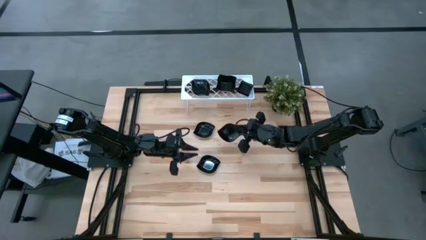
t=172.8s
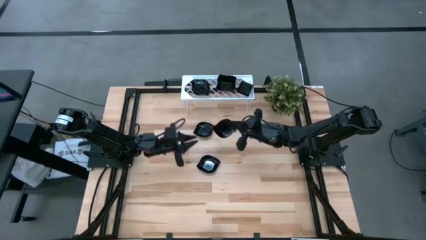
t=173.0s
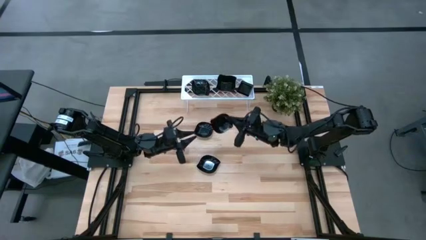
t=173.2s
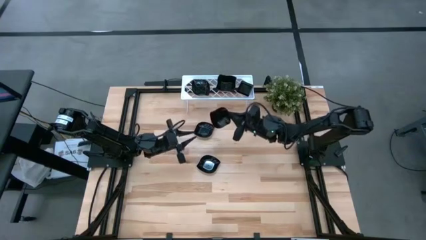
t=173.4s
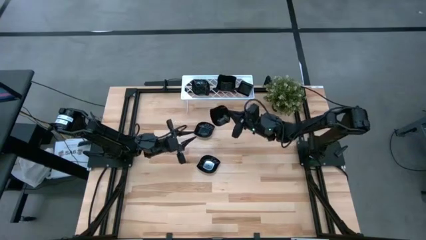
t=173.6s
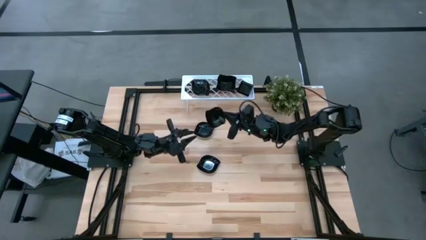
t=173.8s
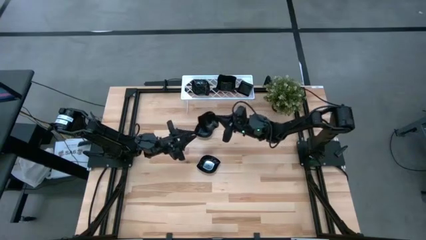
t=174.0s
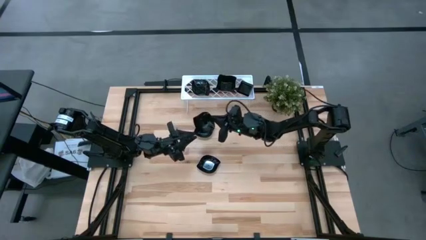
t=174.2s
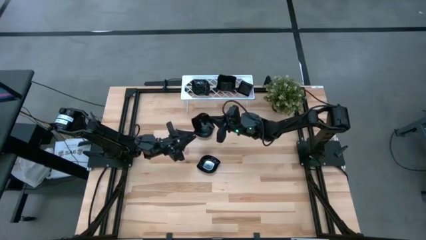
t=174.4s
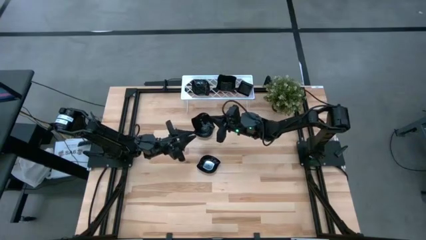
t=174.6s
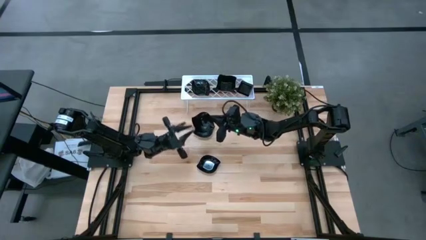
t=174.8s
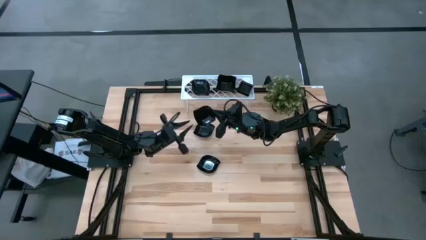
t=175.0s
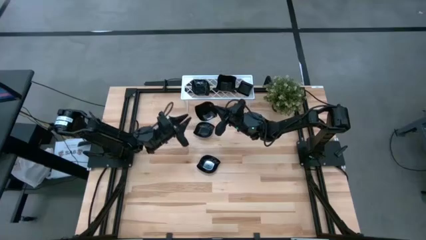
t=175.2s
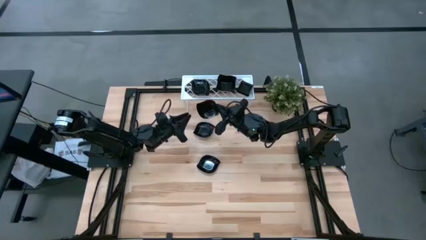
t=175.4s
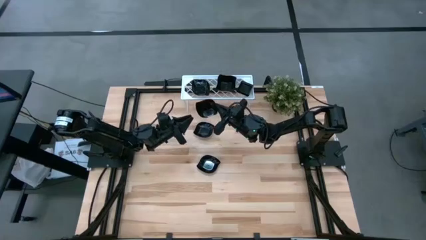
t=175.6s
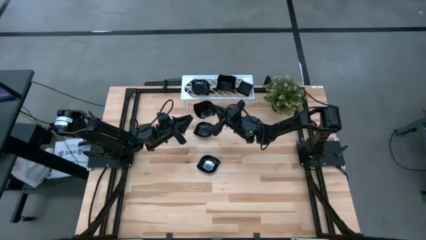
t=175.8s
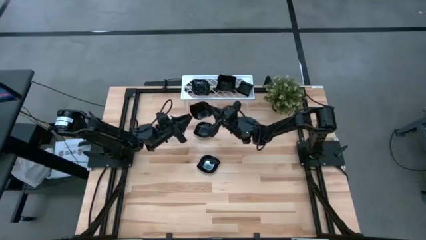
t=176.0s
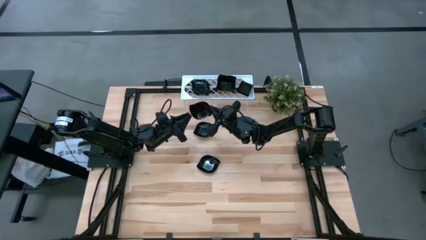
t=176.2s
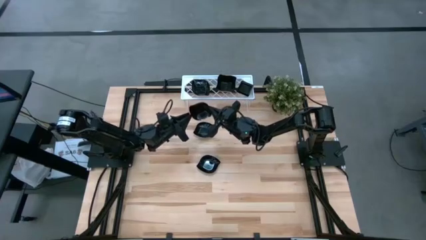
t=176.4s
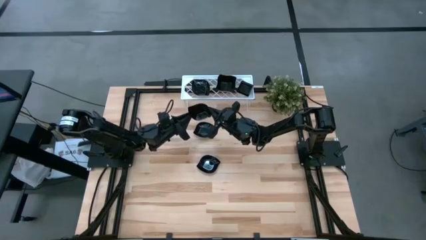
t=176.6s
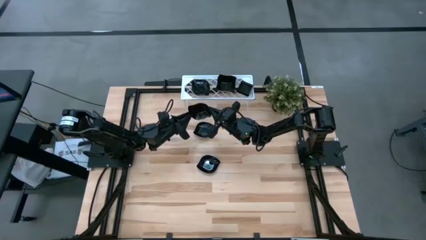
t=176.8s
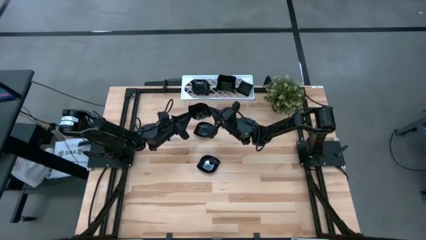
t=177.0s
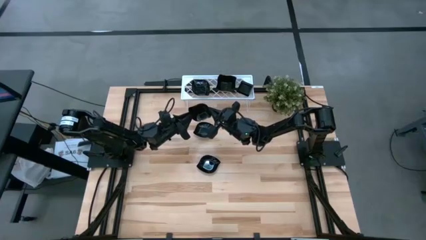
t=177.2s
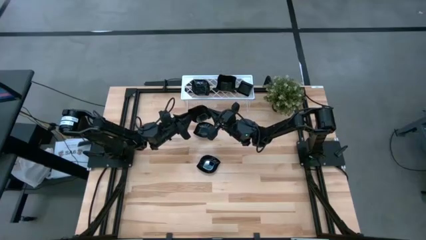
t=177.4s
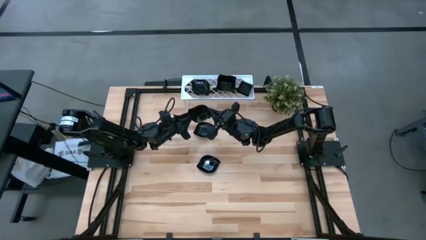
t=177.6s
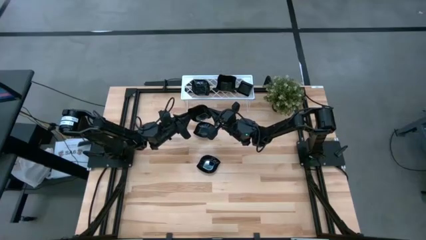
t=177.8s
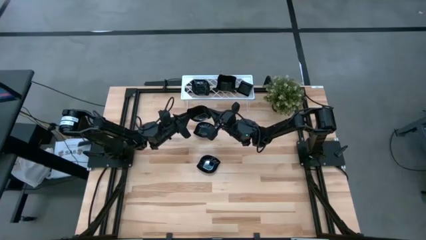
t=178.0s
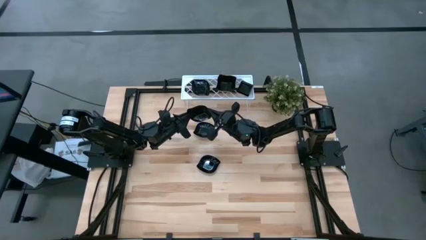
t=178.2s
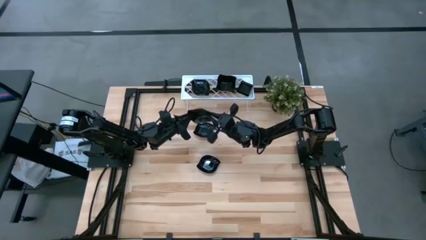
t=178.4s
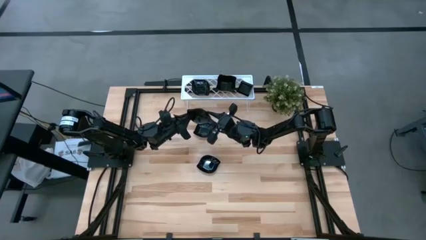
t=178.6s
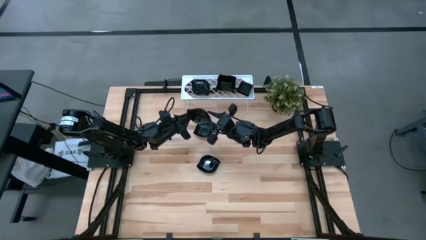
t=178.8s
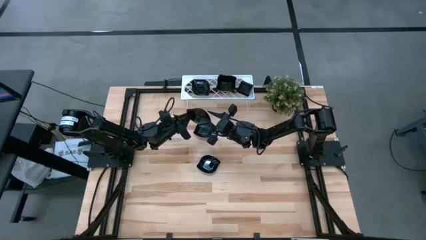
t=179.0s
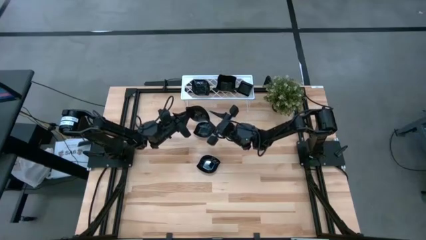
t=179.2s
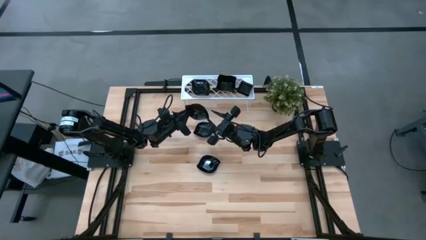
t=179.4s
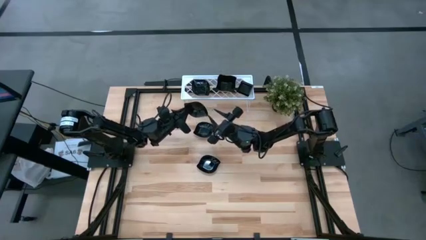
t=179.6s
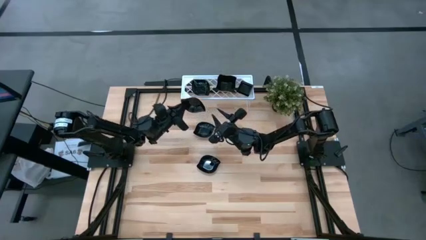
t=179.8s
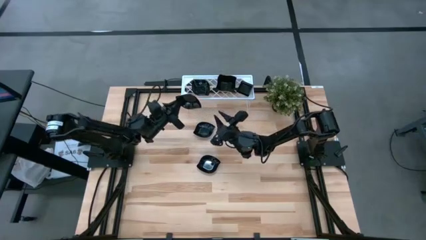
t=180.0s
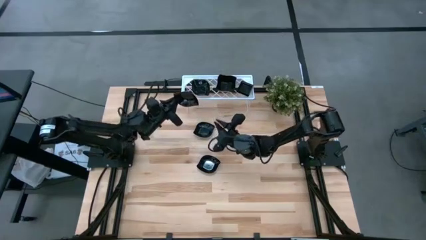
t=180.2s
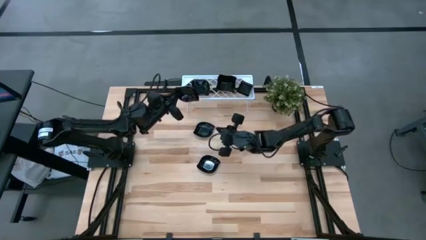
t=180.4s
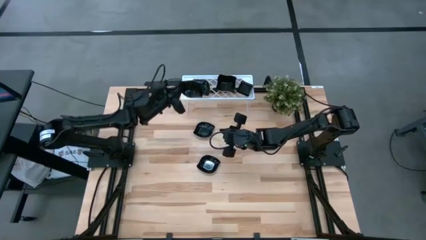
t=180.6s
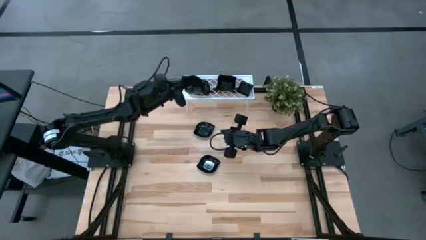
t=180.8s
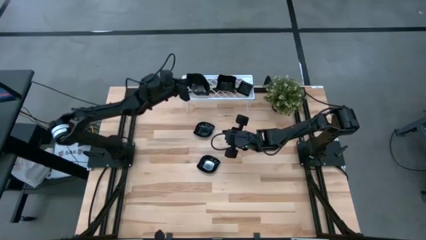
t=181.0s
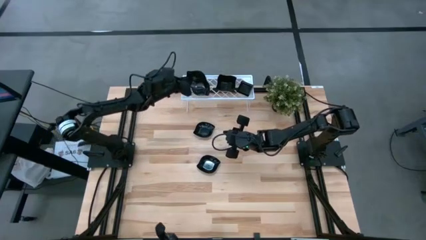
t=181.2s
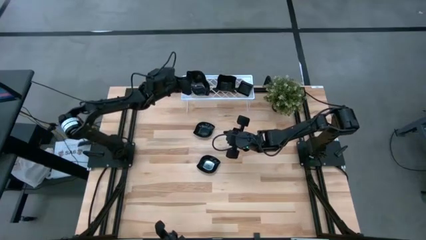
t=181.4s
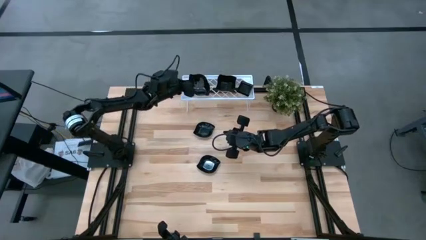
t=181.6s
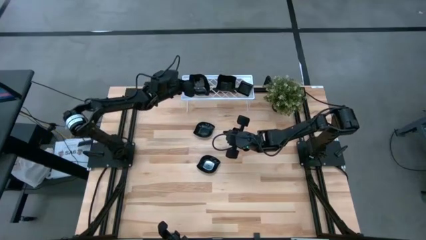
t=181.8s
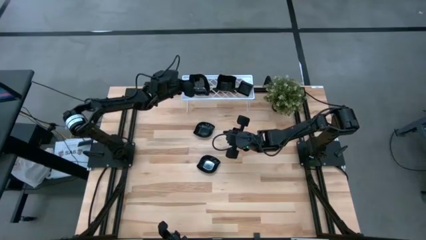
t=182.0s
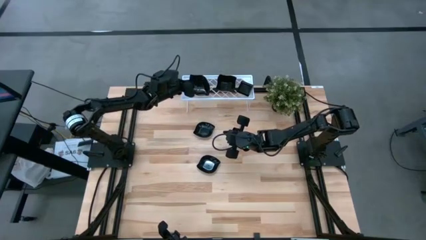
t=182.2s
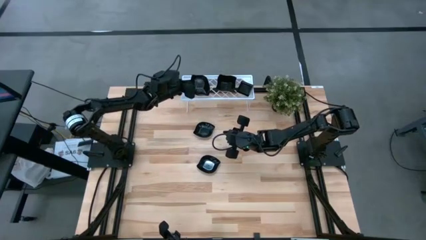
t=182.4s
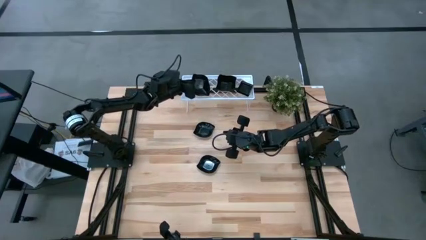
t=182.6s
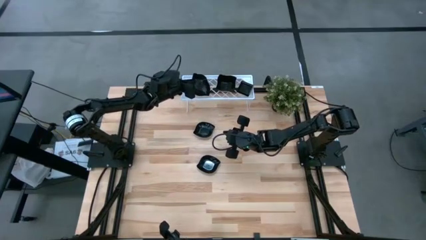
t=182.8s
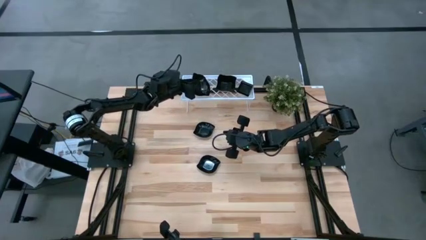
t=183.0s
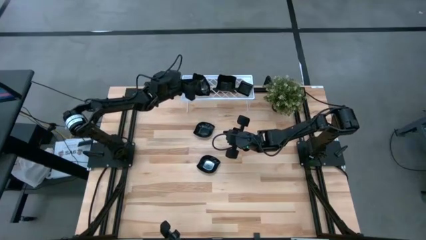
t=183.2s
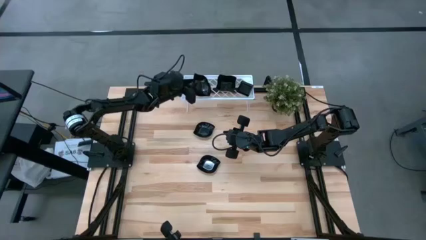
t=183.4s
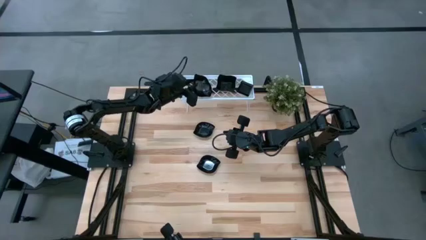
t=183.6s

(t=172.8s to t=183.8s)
Task: Pick & Place Mini shaped plates
Stack the black leaf-shaped plate on top of the black leaf-shaped plate on the shelf

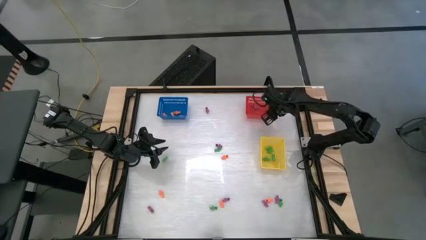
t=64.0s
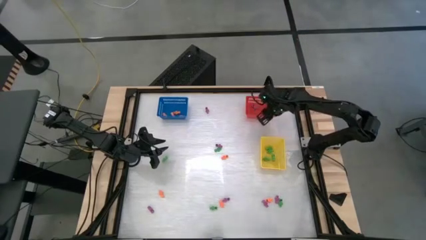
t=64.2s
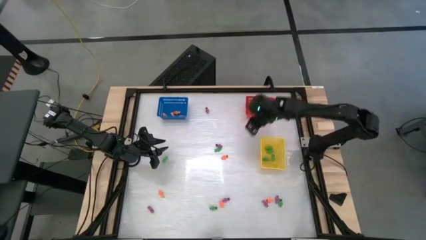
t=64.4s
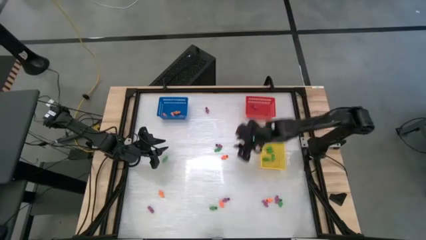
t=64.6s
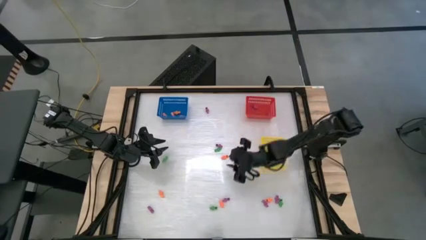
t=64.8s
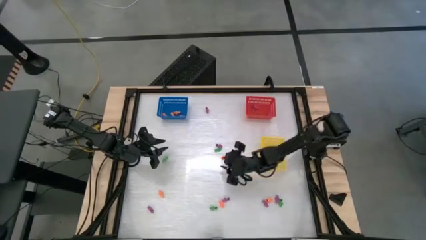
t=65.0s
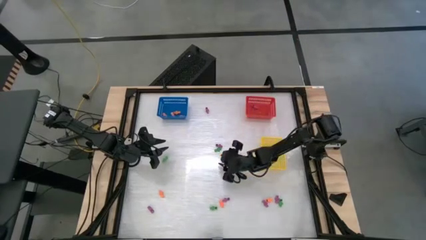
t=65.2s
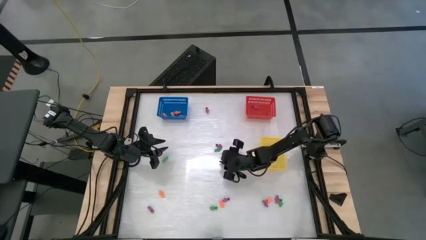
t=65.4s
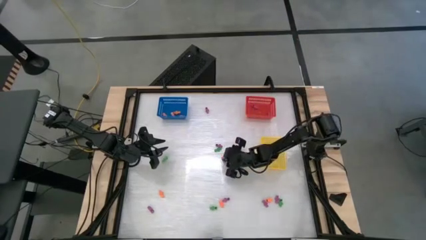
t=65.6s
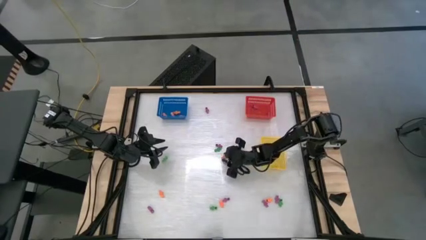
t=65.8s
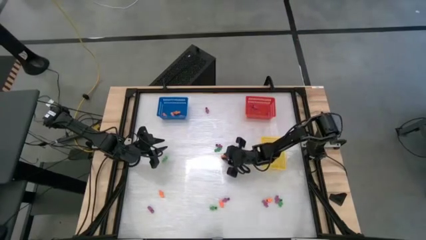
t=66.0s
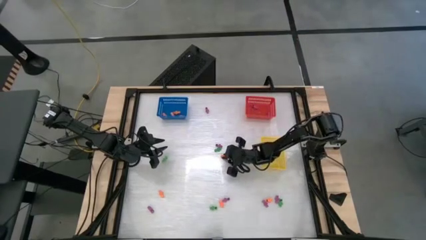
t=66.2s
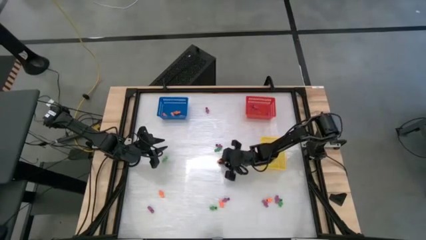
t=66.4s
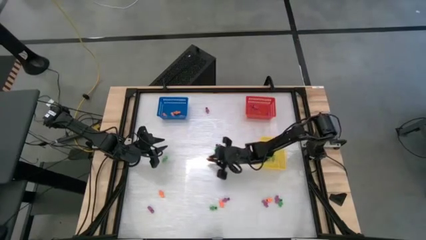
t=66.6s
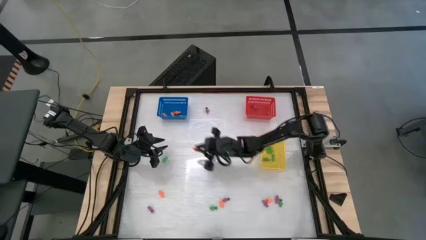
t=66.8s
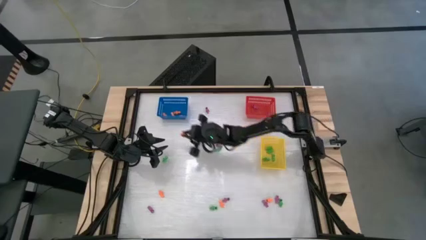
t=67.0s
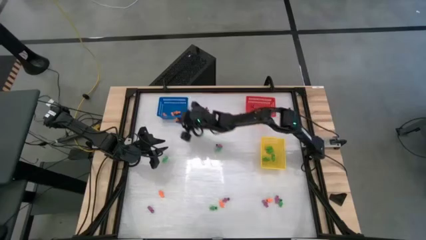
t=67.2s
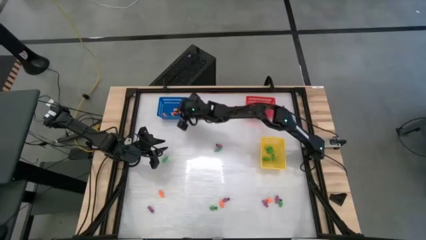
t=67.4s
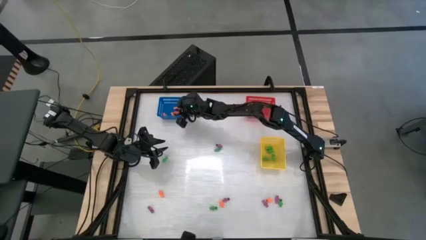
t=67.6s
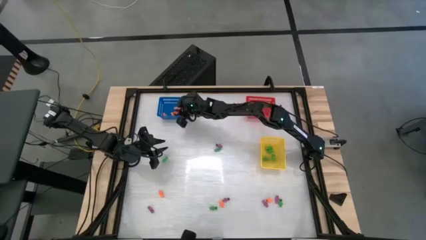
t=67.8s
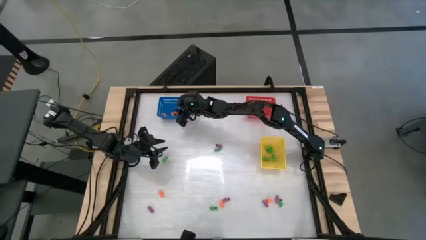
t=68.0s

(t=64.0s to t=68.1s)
Task: Sort Halloween decoration
Put the skeleton toy into the blue bin

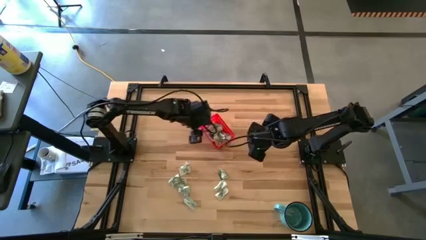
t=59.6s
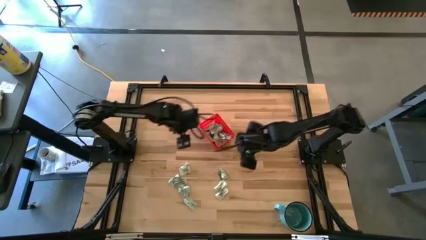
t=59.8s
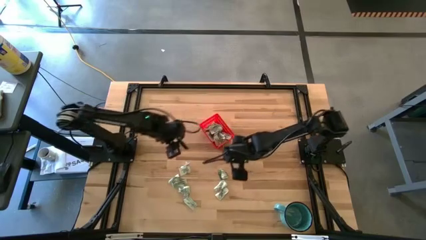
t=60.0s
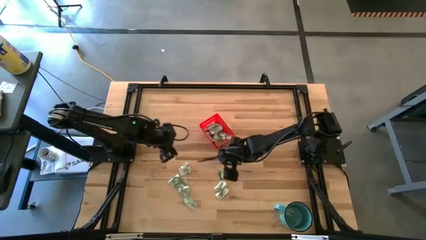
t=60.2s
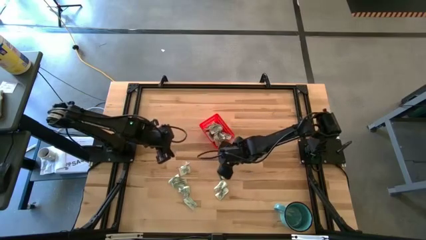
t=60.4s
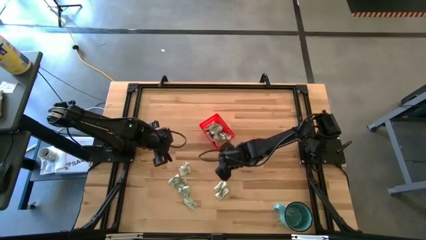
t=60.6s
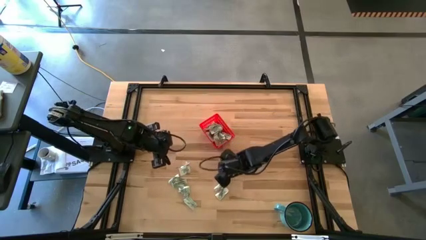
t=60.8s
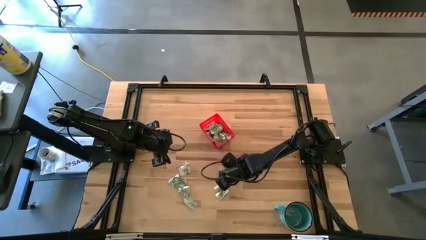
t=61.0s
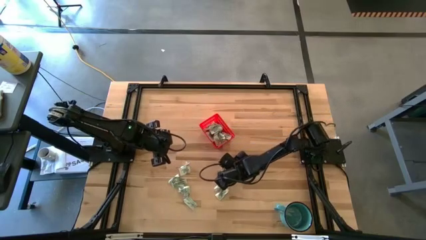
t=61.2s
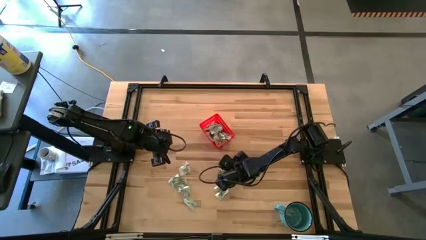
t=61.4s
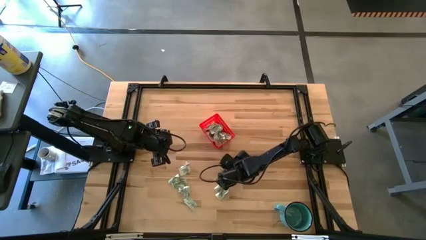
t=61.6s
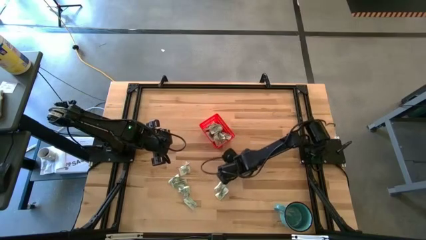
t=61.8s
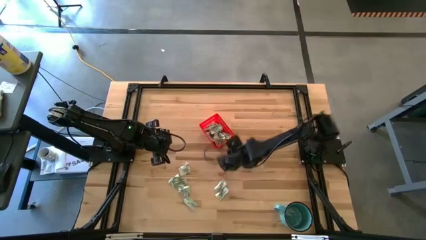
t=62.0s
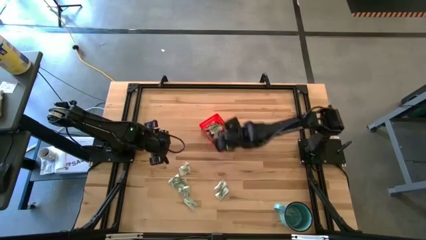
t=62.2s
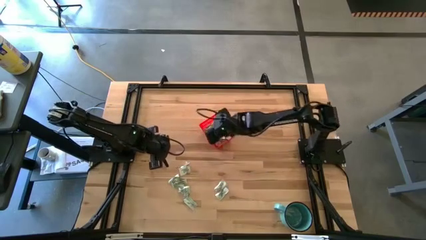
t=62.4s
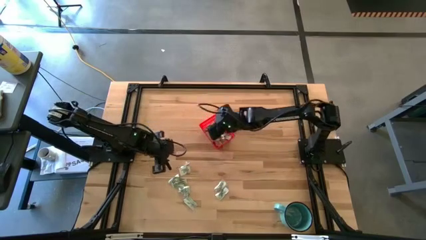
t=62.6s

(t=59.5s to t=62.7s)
Task: Pick and place Stevia / Truvia into bins
Put the stevia packet into the red basket
